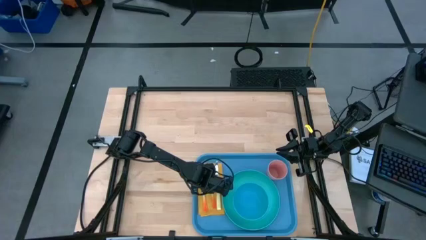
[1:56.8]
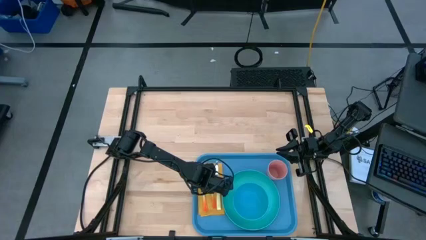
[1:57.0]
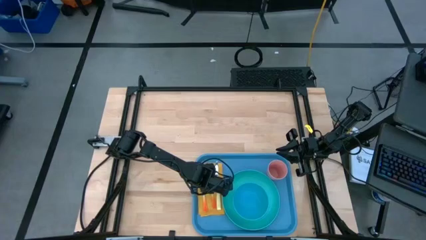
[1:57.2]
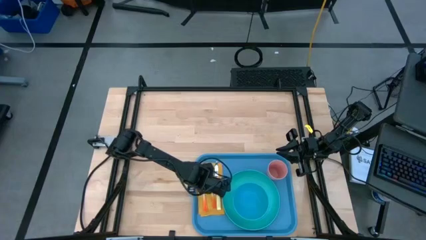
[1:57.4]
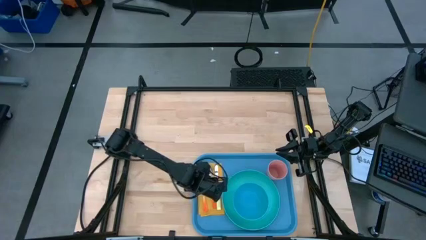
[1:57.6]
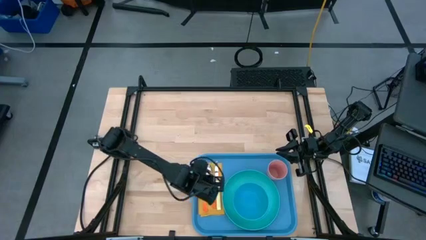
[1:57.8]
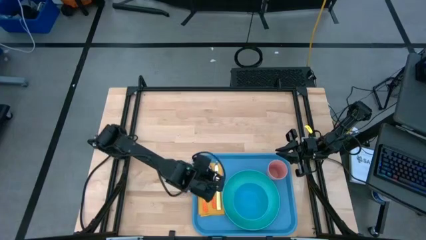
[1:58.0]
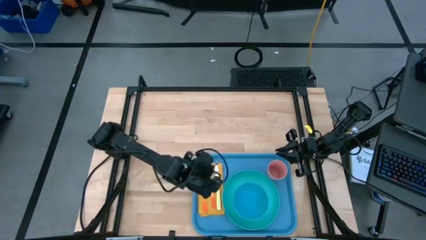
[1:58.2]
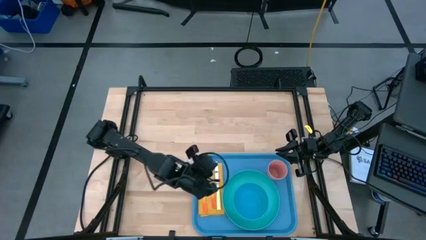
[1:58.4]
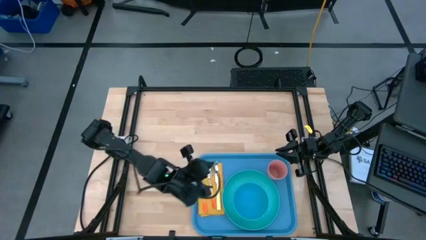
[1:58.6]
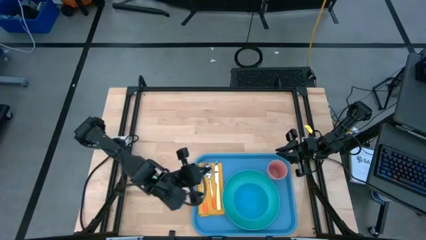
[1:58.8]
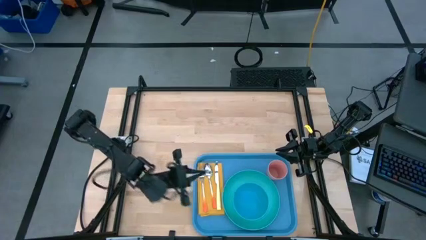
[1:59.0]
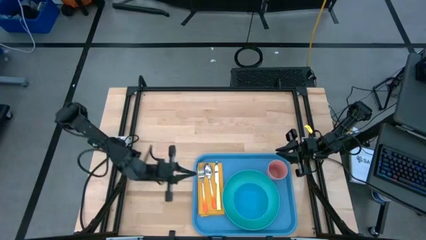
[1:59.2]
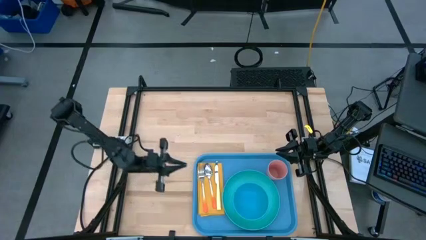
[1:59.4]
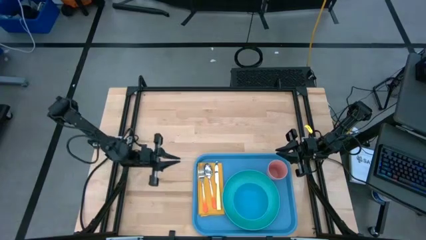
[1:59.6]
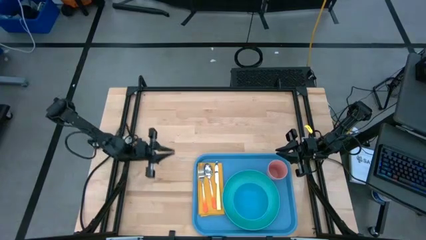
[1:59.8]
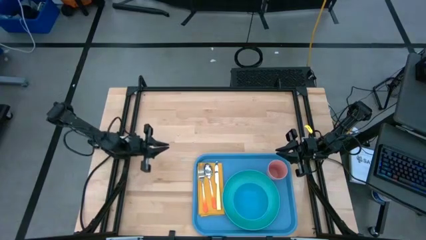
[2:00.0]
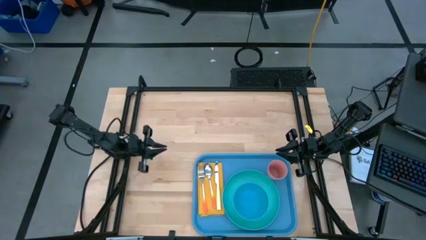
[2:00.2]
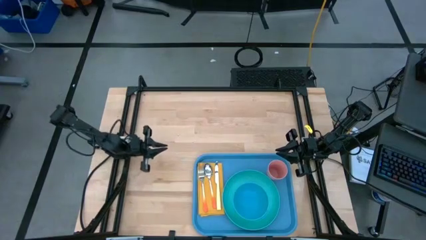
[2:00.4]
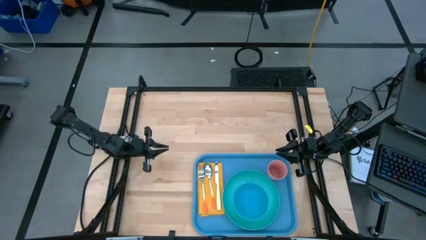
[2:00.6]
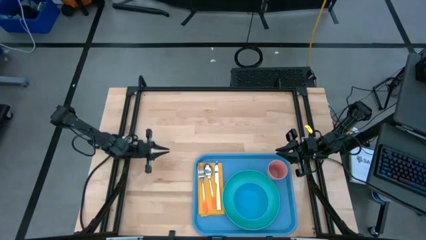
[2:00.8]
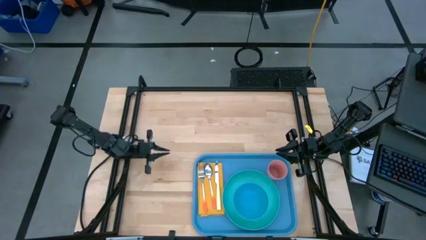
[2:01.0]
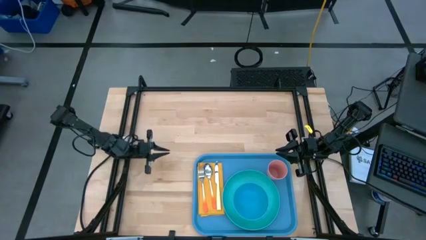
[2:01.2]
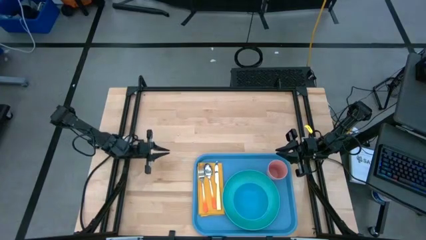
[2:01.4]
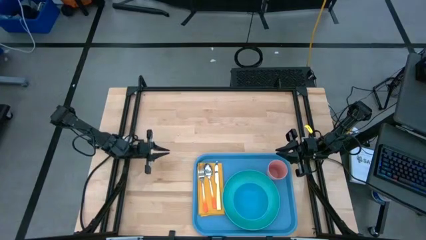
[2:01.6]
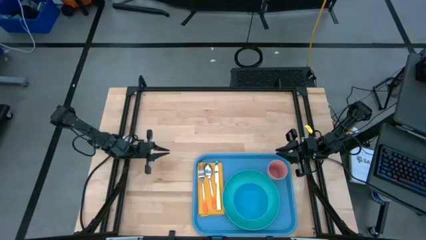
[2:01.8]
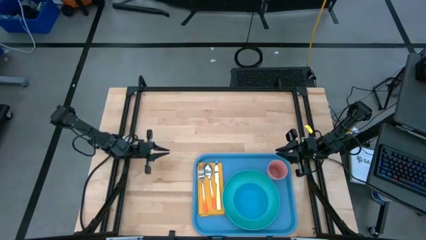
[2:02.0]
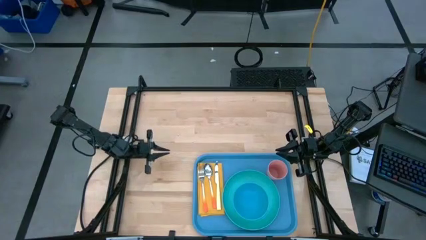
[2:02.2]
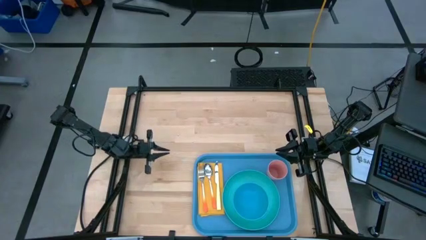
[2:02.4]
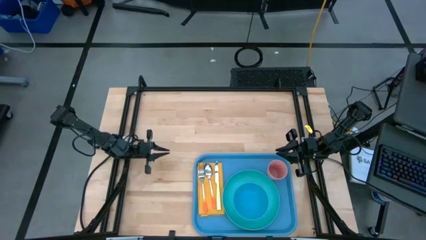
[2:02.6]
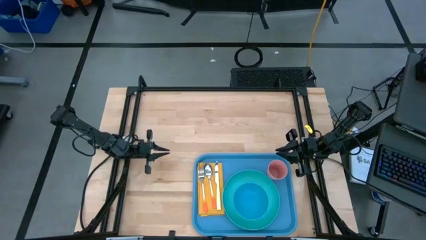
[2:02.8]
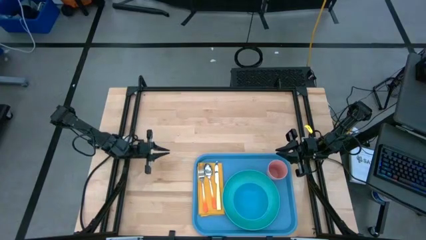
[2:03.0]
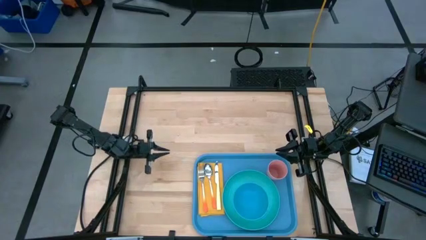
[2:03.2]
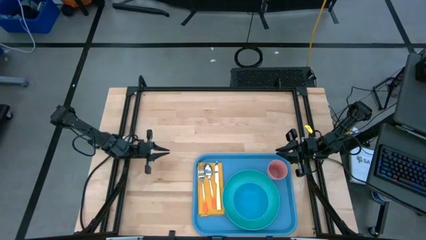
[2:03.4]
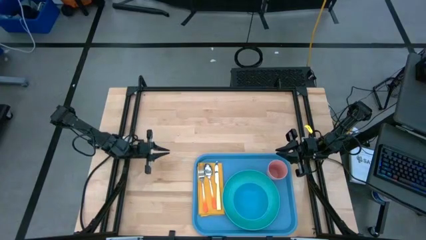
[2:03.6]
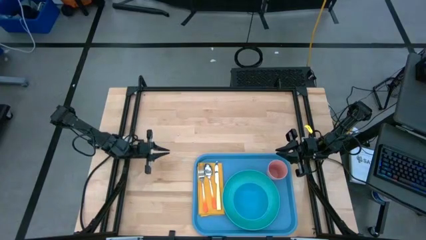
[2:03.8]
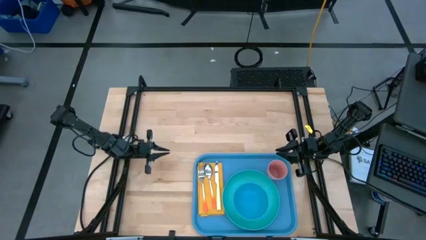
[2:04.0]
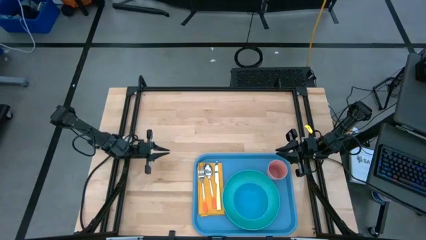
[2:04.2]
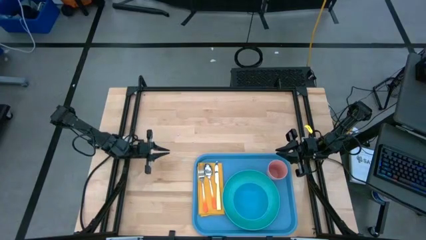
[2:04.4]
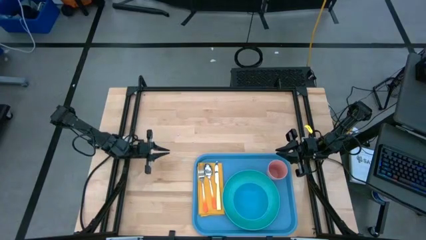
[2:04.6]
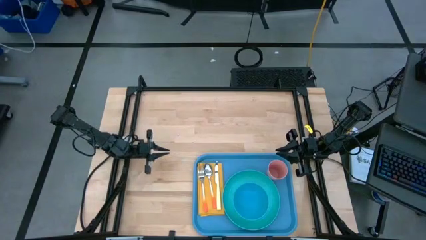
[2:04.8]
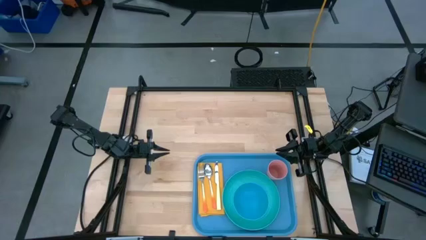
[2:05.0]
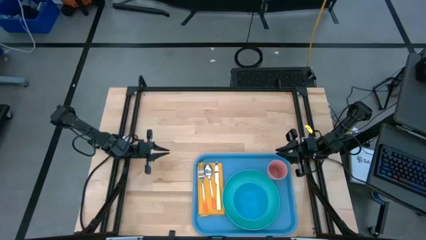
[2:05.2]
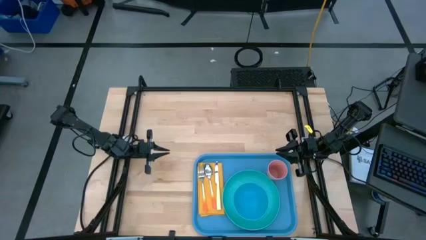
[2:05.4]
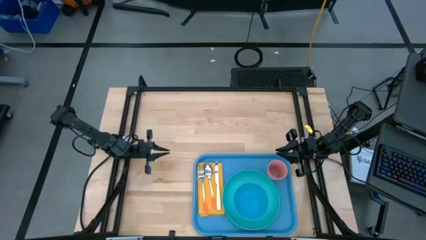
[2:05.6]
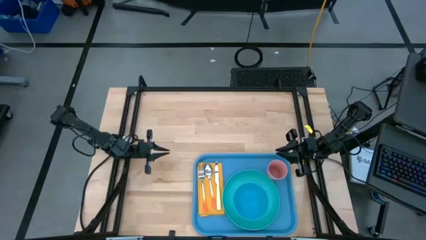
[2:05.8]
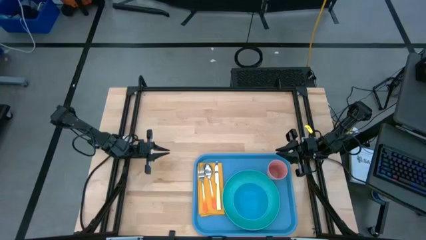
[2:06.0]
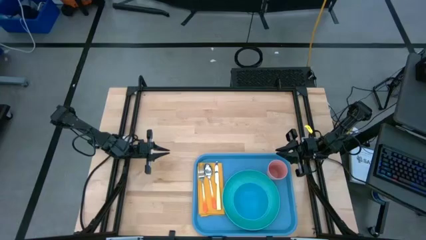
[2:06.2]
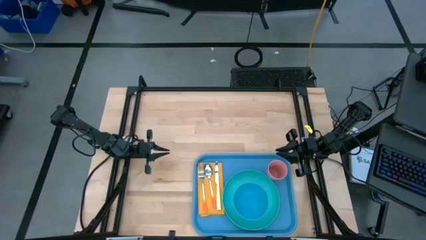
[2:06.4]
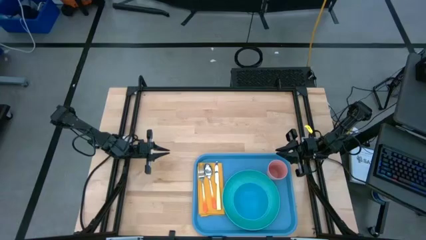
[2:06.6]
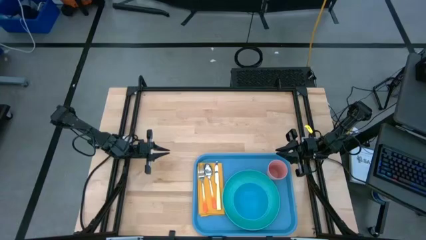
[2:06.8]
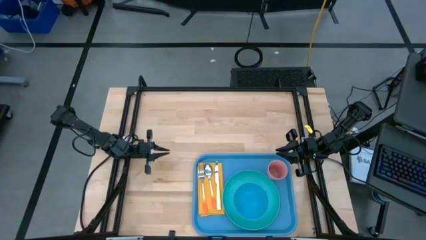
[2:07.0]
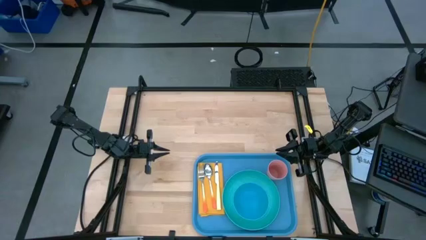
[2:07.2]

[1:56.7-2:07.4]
Task: Set up tray
Return to Home Position

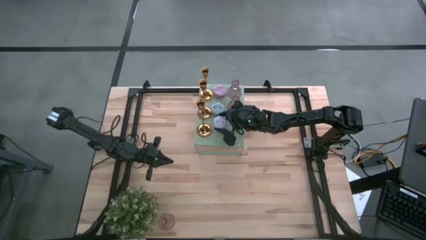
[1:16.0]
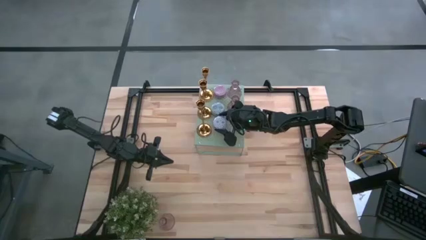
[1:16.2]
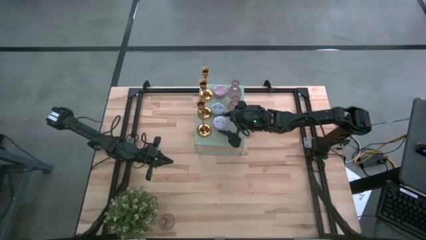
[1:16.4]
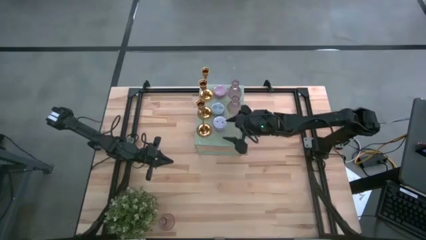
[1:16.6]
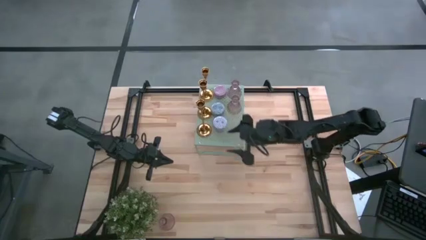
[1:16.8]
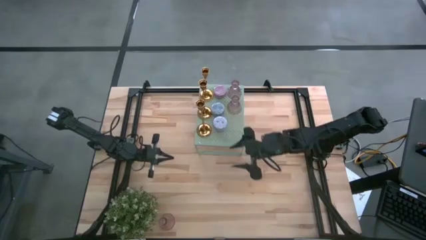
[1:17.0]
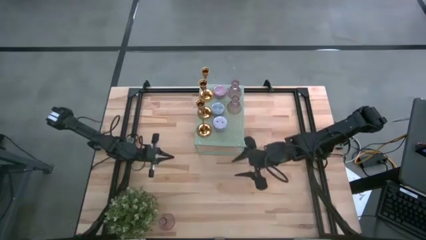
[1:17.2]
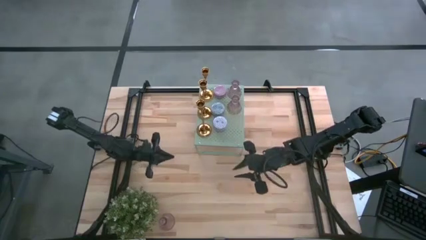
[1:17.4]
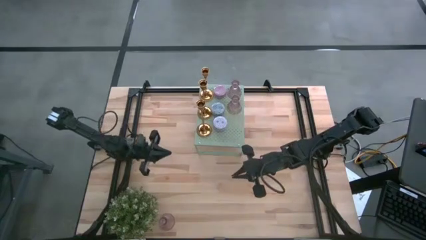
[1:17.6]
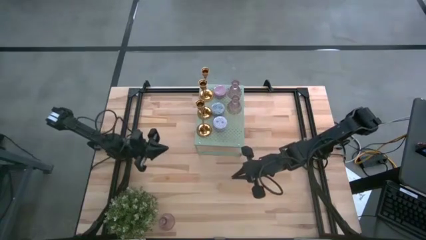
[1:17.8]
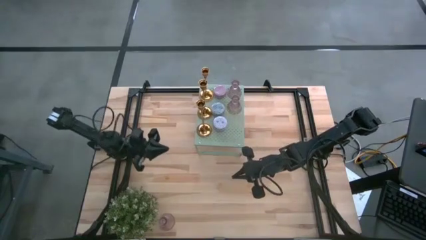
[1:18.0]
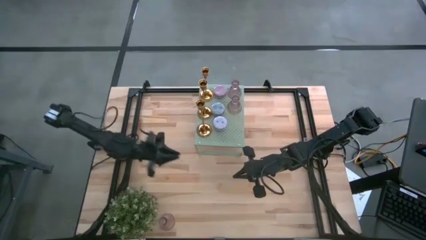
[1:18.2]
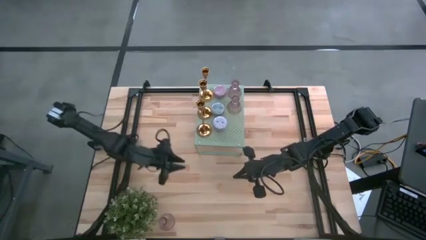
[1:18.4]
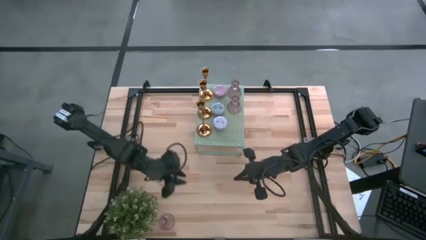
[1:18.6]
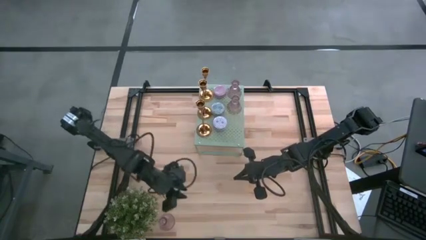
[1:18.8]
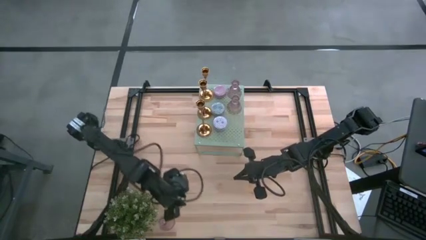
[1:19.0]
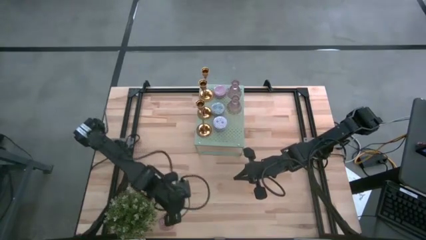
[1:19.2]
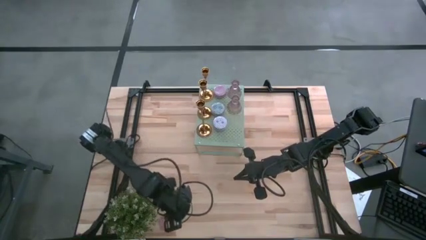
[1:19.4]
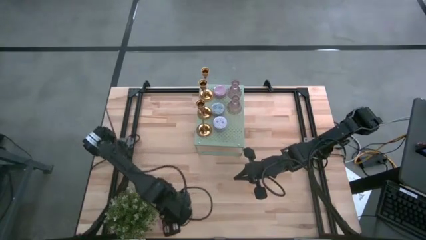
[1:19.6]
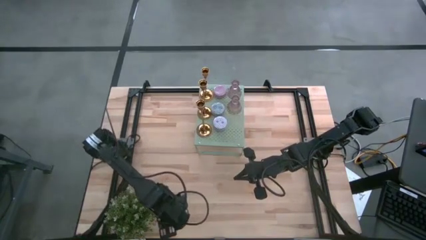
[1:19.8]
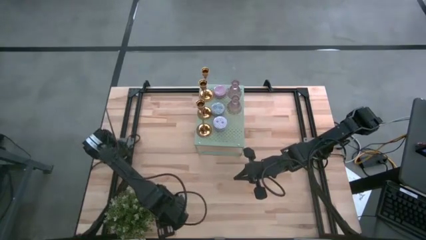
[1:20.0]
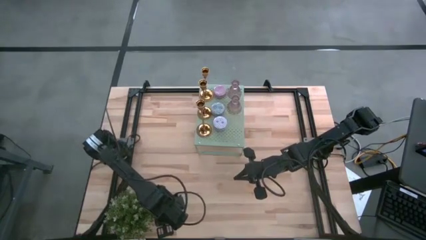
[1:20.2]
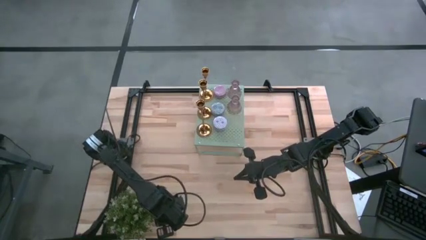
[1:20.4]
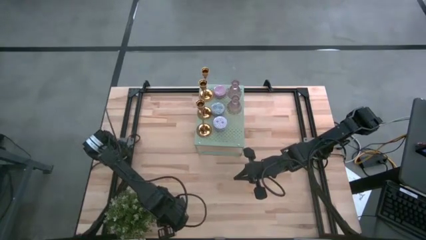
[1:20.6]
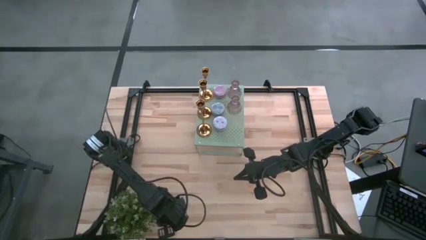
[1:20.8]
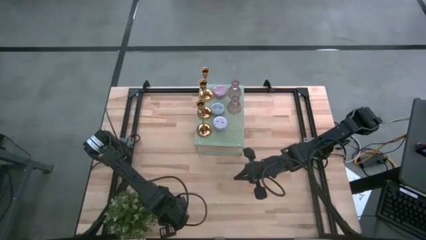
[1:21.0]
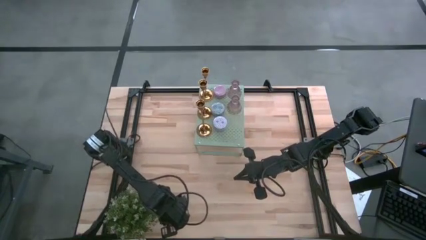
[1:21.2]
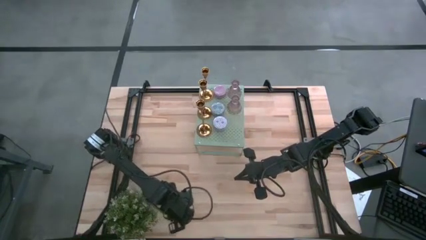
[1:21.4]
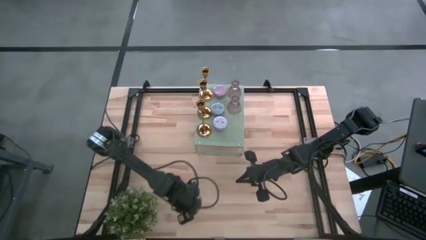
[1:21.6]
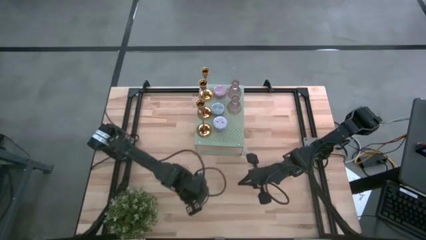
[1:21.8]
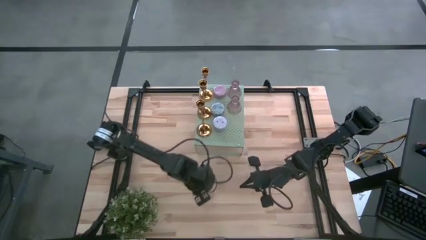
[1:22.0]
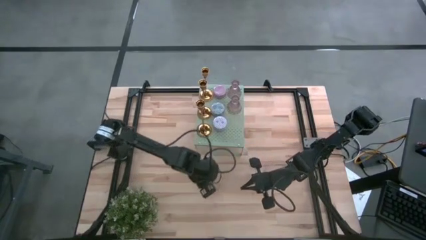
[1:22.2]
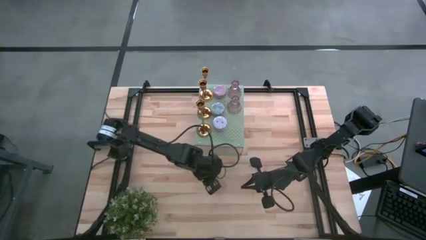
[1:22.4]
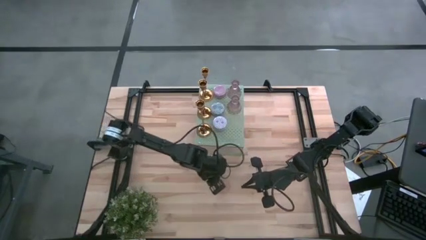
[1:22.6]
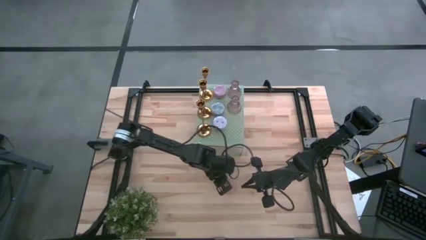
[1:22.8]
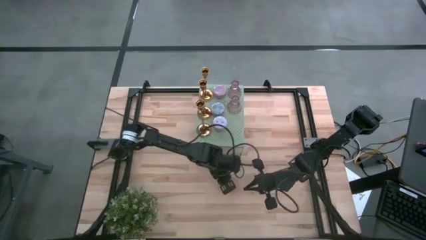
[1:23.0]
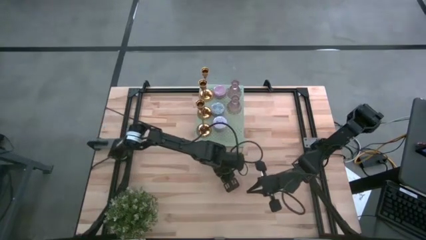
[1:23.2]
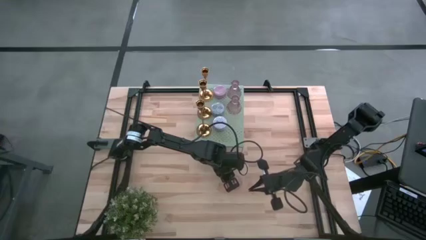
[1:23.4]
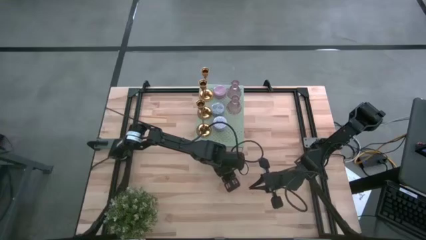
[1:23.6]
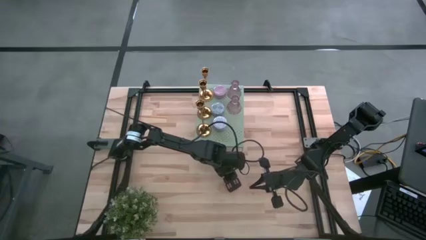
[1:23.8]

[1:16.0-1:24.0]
Task: Pick & Place candle stick holders
Move the pink glass candle holder to the center of the table
